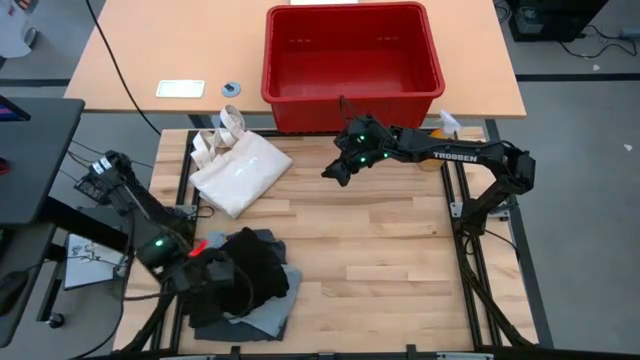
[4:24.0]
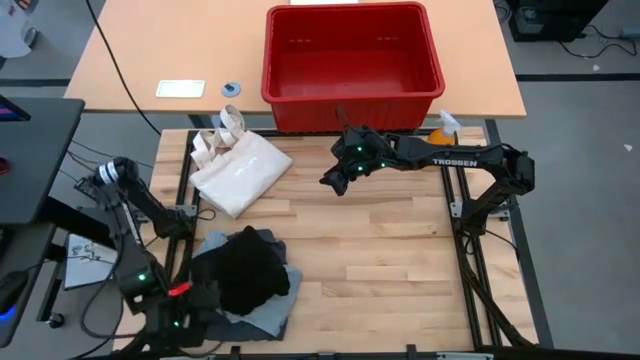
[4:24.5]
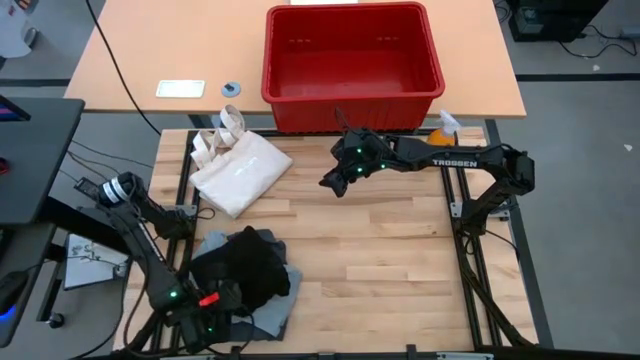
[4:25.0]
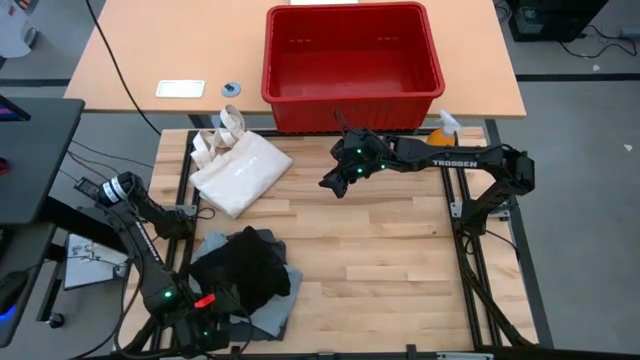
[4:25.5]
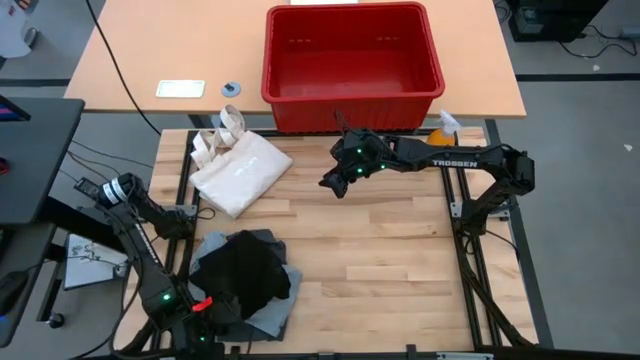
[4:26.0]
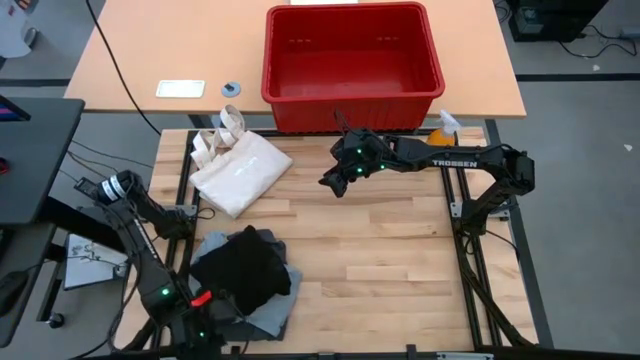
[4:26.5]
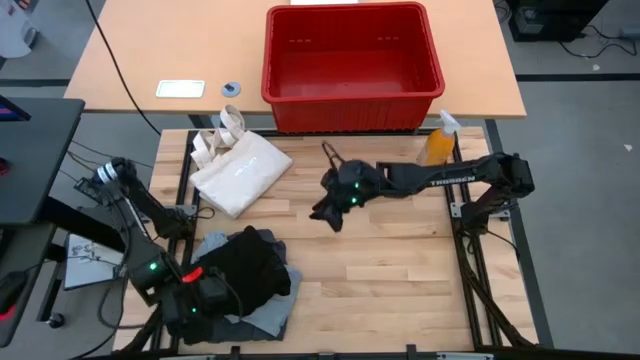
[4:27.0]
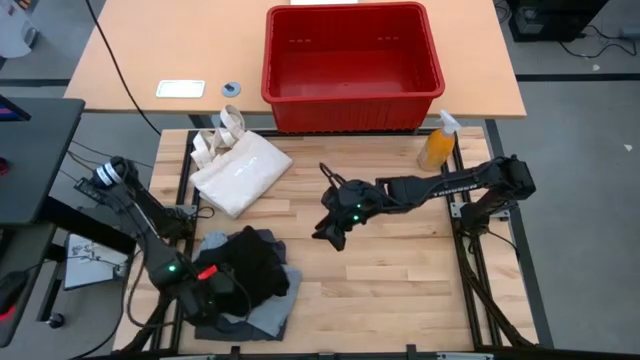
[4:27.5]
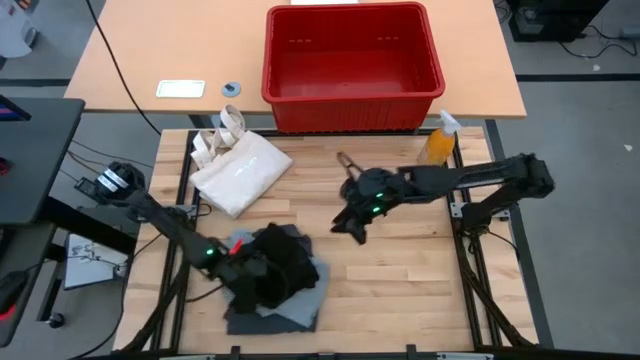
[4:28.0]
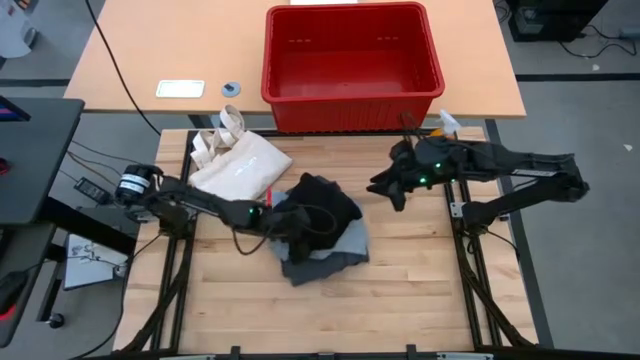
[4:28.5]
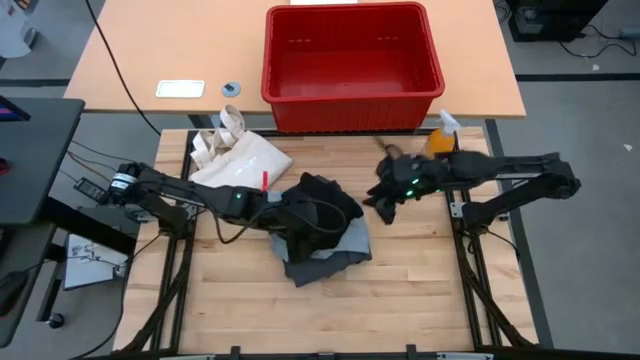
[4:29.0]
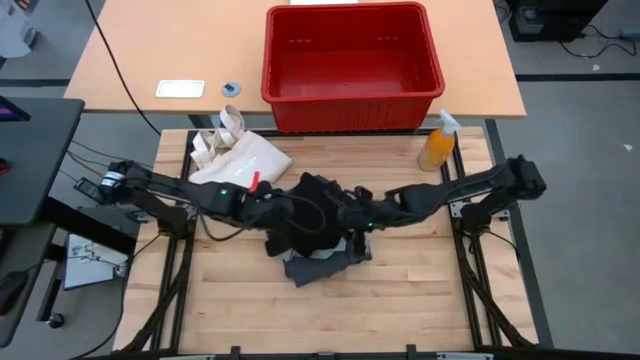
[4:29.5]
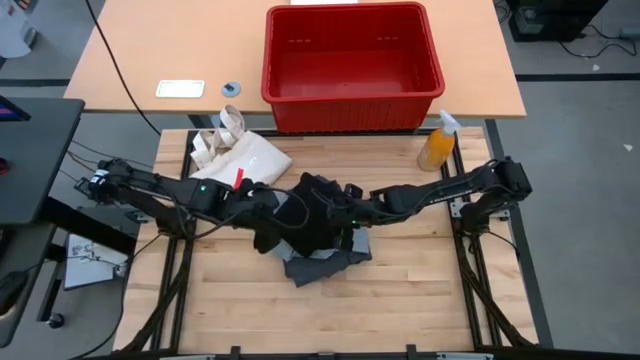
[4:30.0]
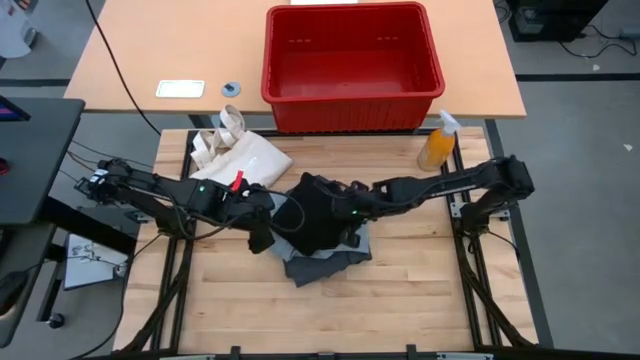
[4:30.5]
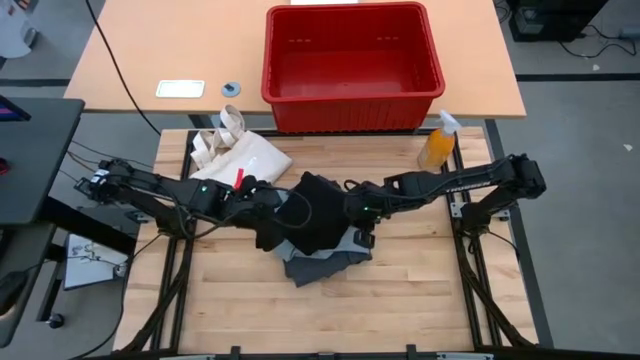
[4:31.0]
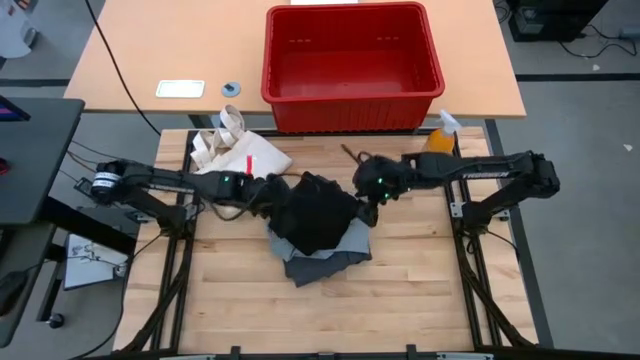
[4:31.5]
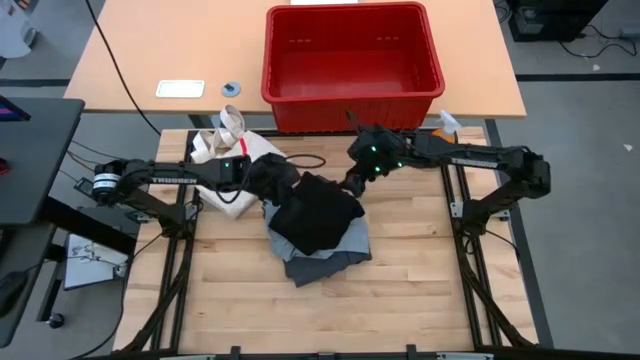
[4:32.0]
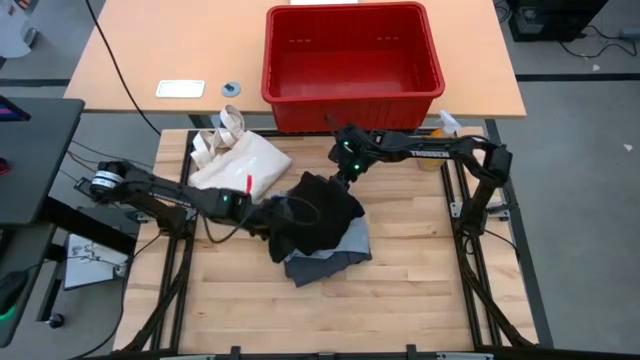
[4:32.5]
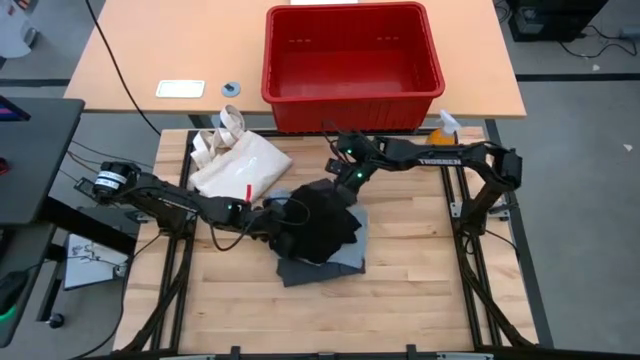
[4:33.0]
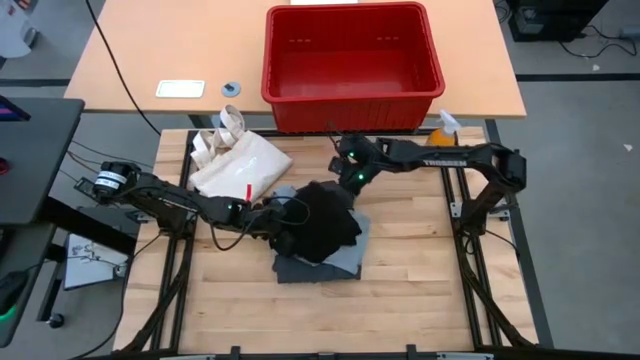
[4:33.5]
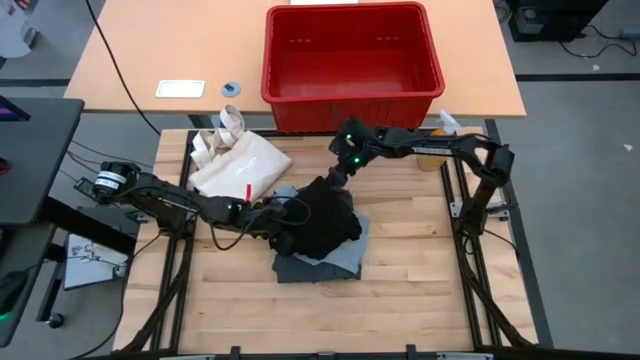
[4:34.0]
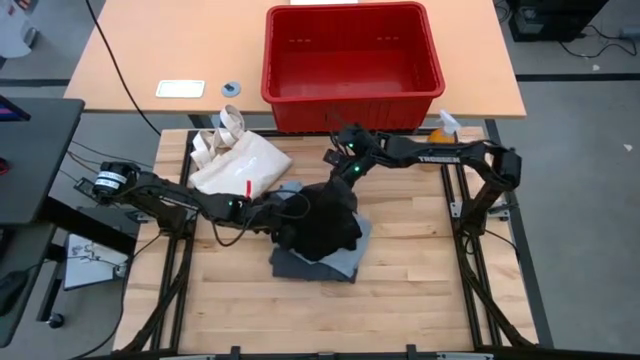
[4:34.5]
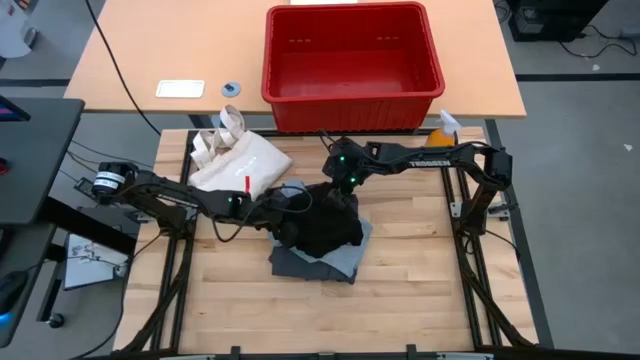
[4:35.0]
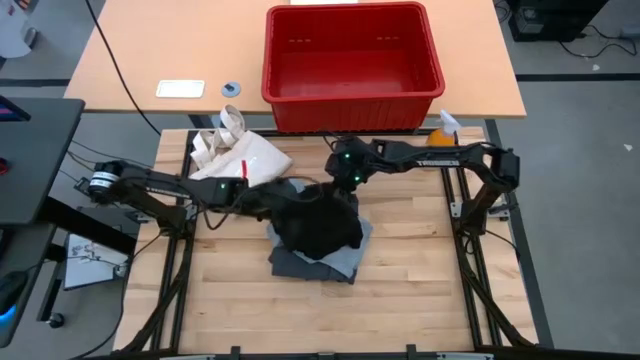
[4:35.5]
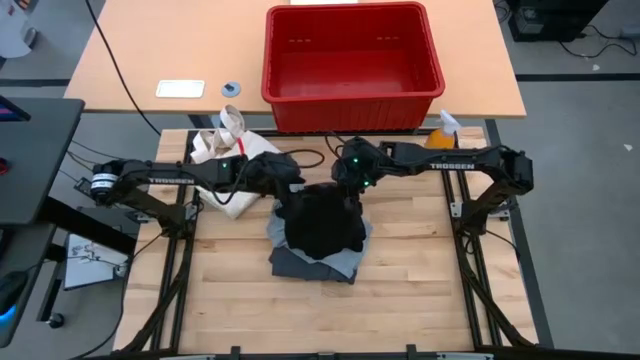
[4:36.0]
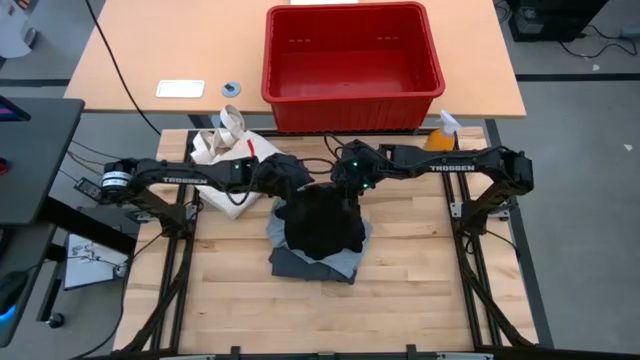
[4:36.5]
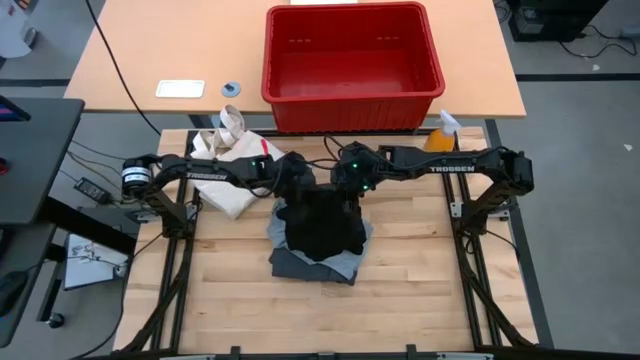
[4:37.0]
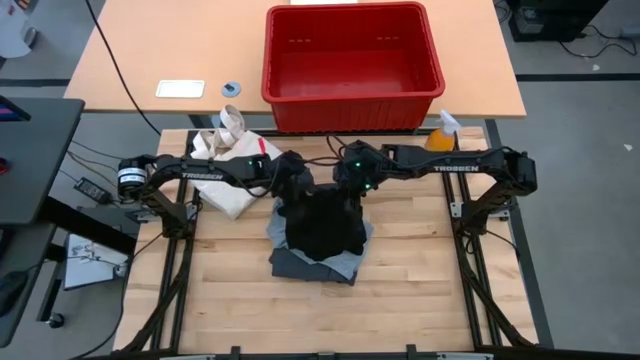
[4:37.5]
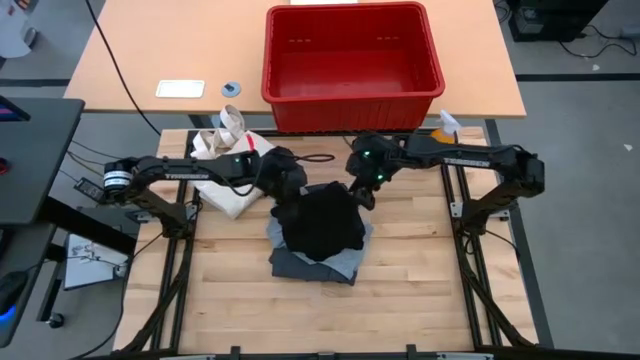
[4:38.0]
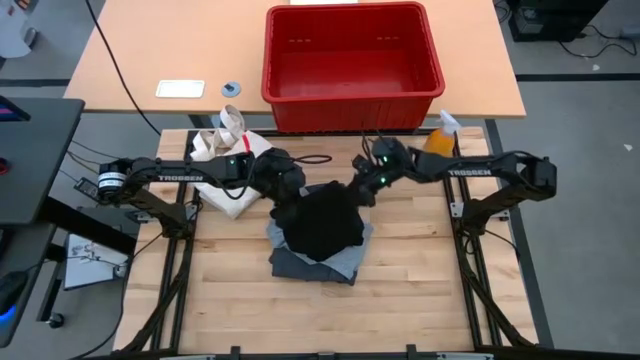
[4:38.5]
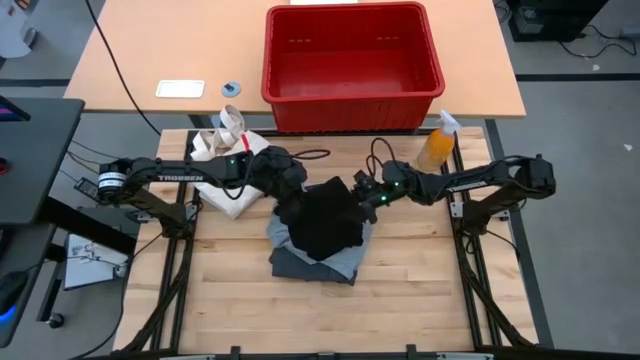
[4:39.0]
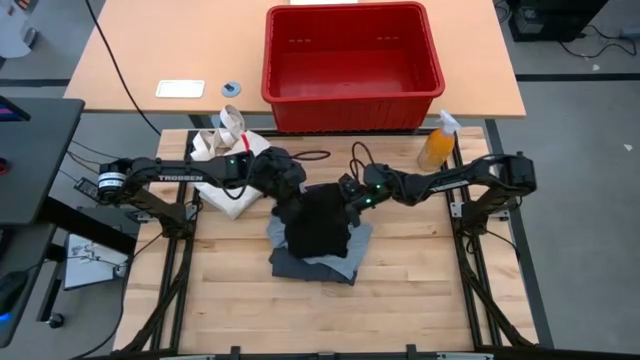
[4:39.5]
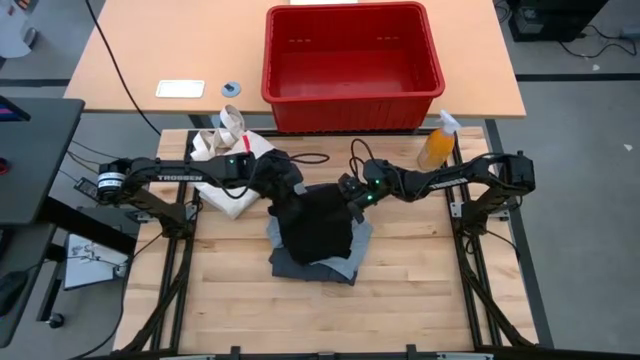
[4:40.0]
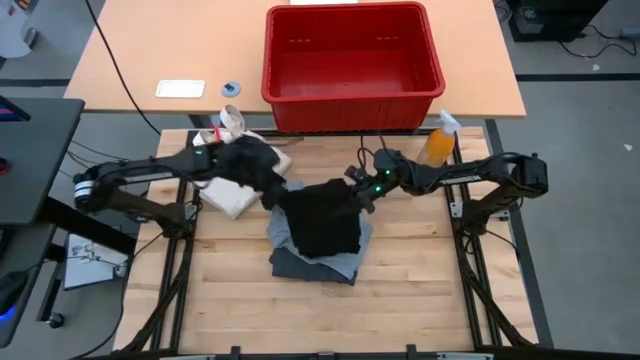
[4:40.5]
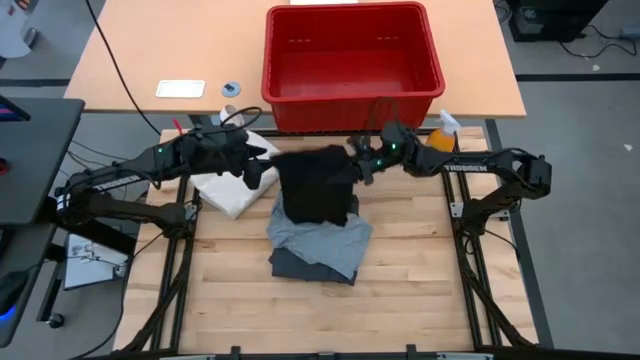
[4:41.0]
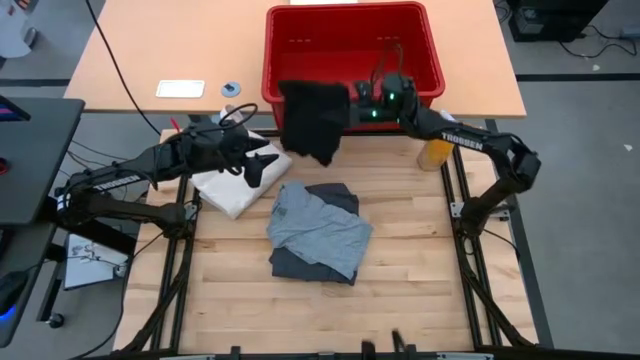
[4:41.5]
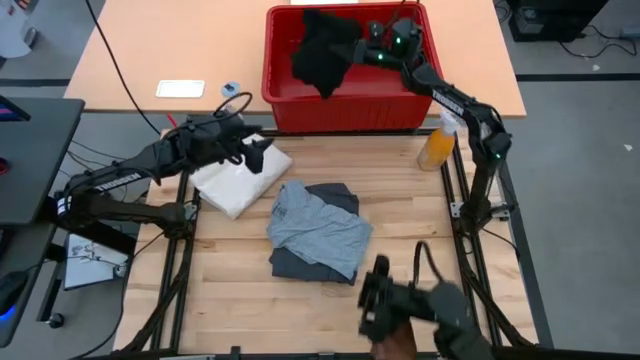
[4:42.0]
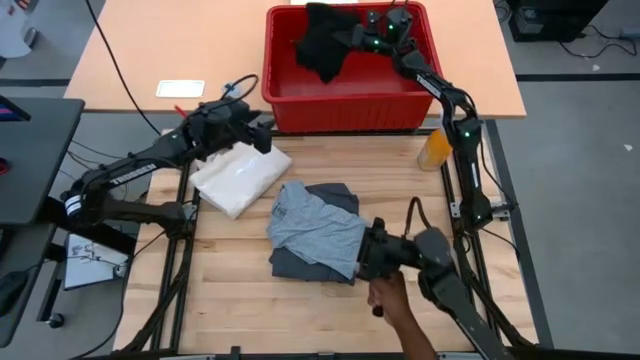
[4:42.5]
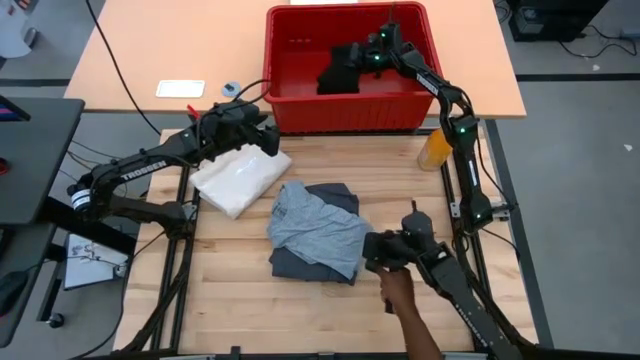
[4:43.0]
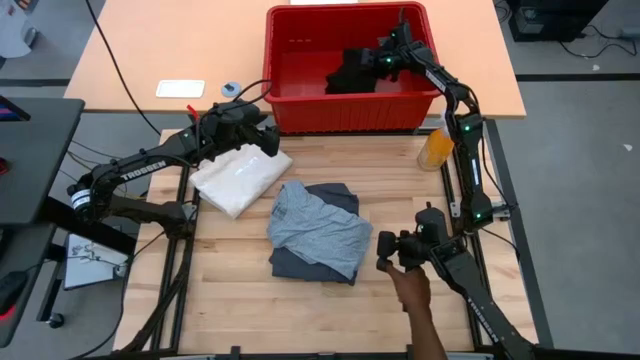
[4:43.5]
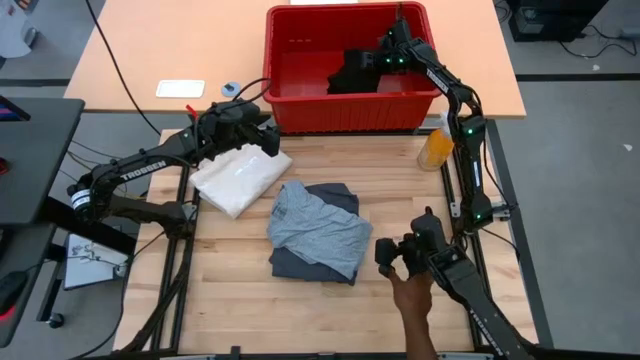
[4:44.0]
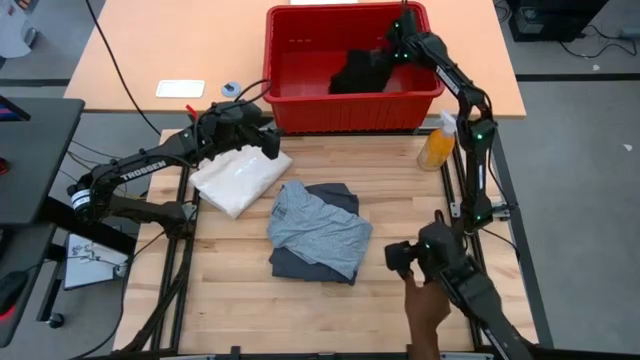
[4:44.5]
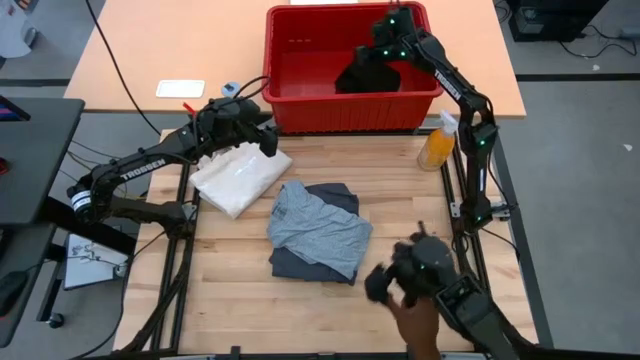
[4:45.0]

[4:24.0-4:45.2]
Task: Fold Laundry from Bin
Put the black t-shirt into the red organizer bin
